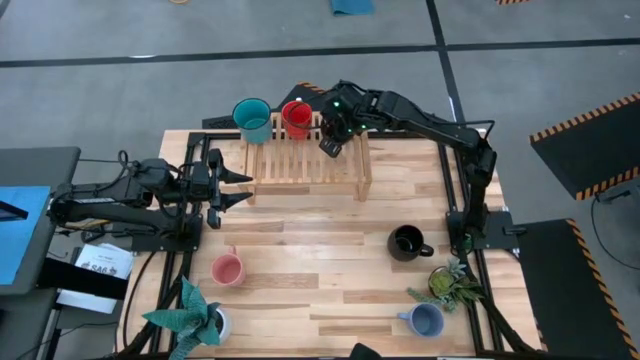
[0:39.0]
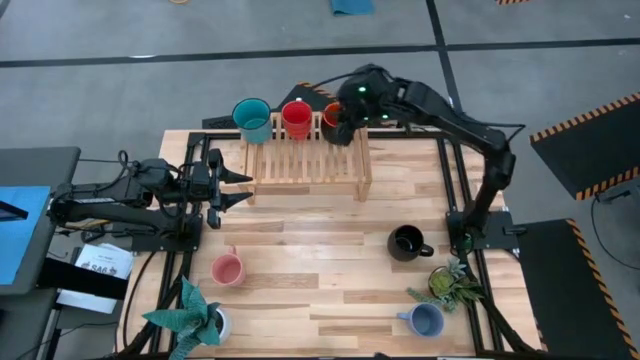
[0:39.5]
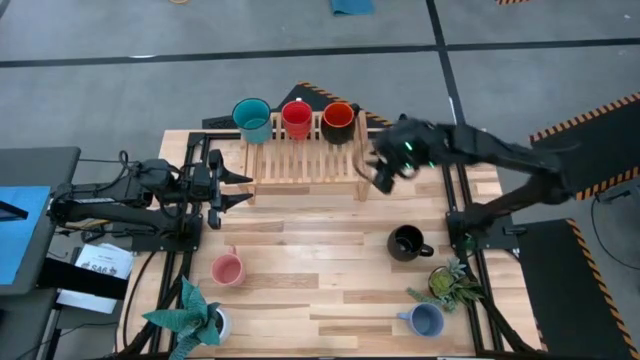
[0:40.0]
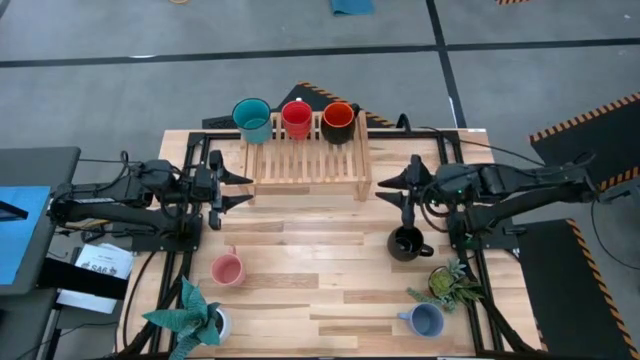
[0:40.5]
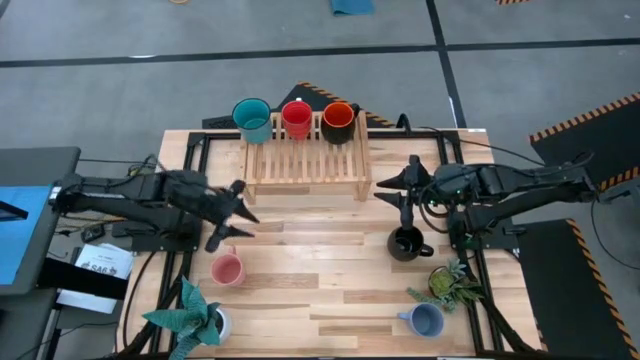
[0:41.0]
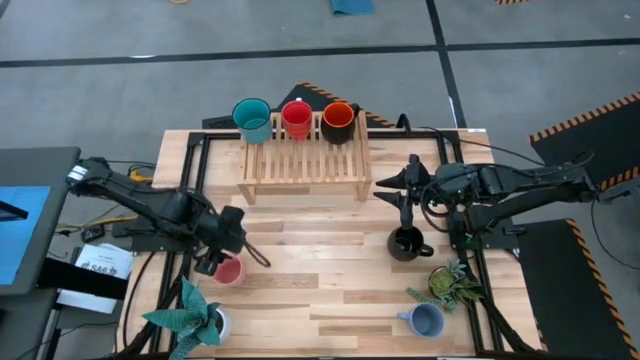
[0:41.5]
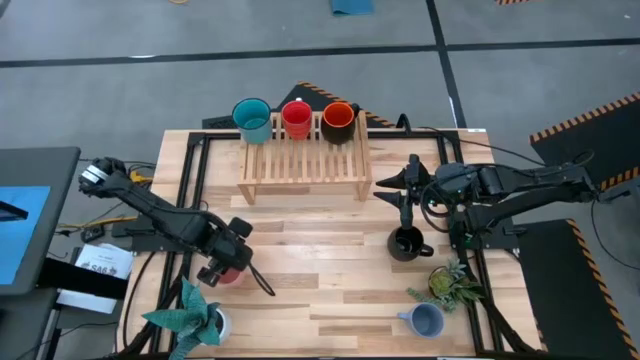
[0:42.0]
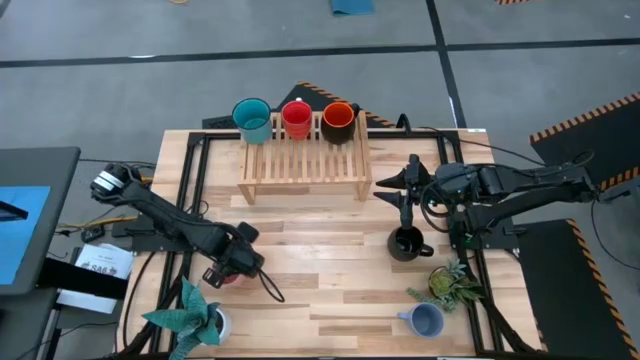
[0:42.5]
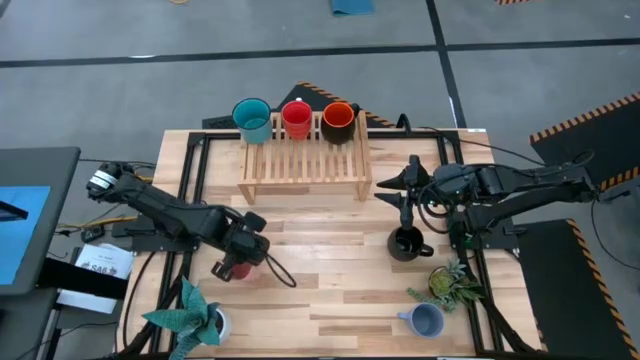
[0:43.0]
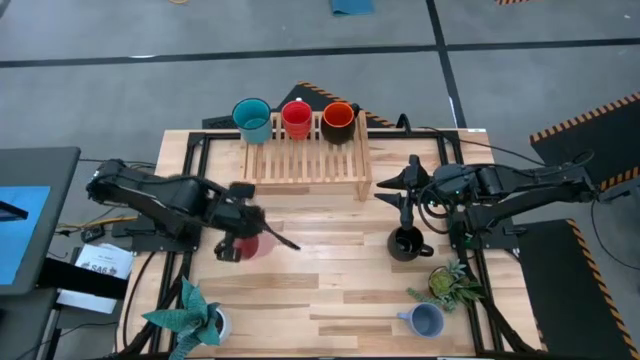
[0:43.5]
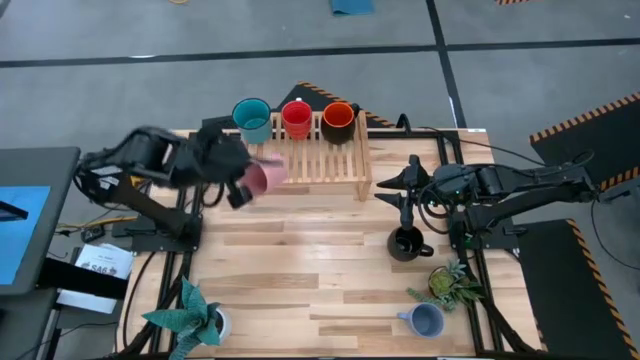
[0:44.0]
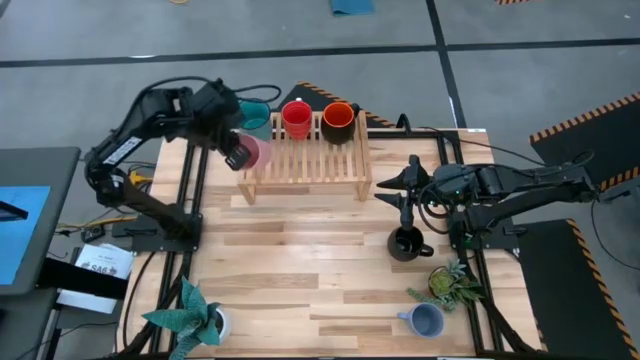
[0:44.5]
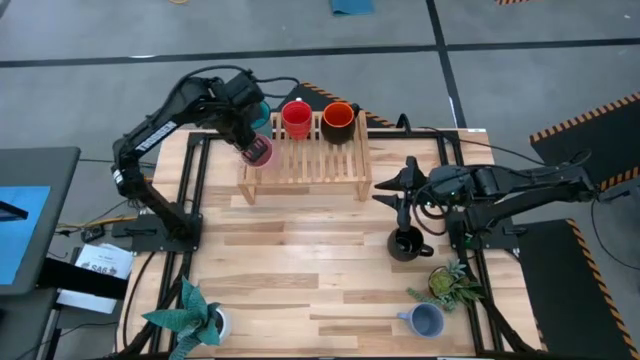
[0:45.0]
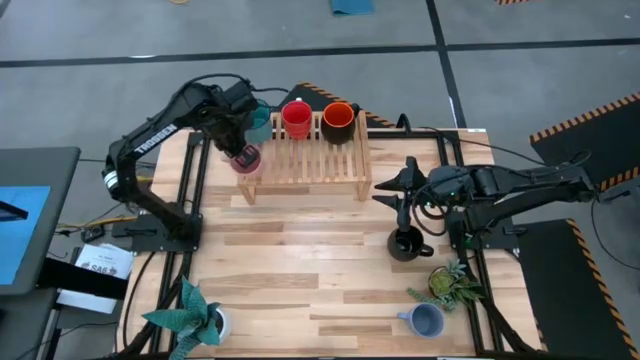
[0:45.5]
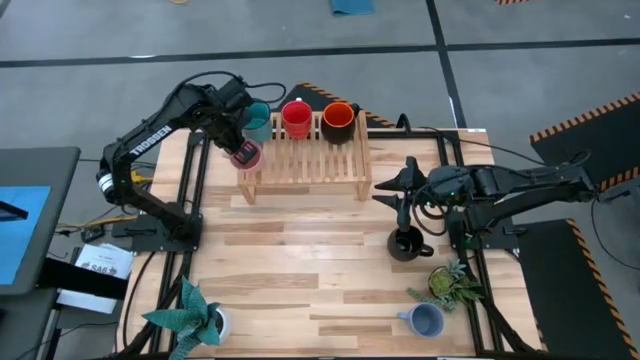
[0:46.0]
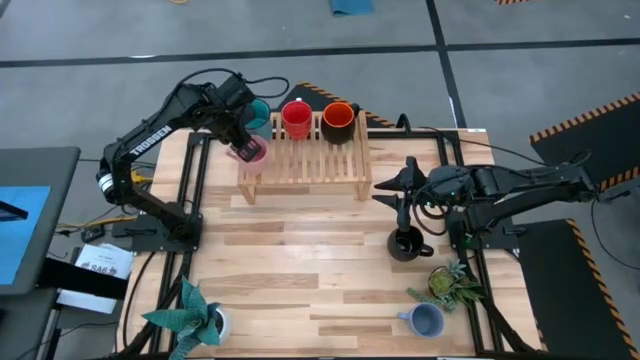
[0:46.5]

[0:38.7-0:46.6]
Task: Place coffee mugs
Put the pink cup on the shelf aligned with the other blue cup

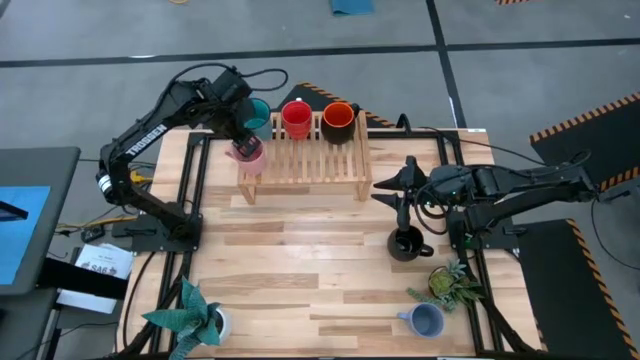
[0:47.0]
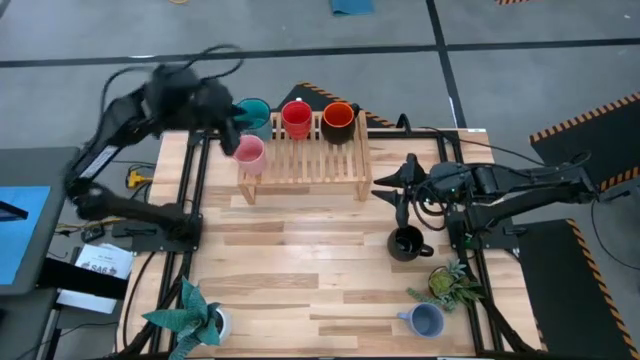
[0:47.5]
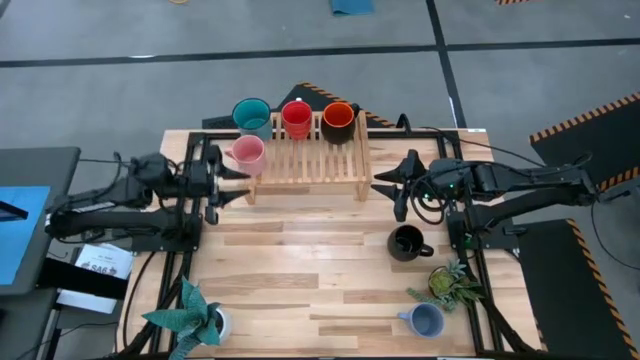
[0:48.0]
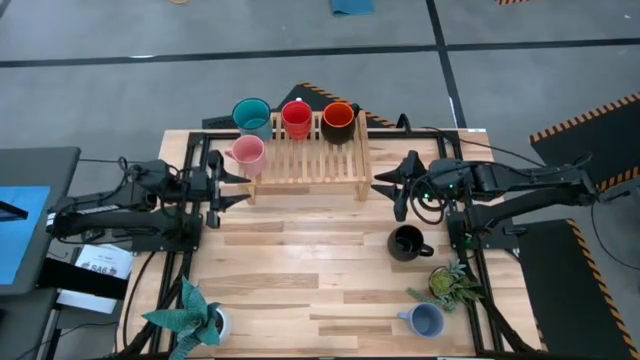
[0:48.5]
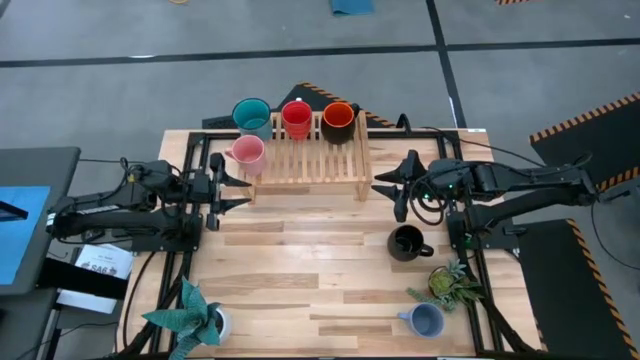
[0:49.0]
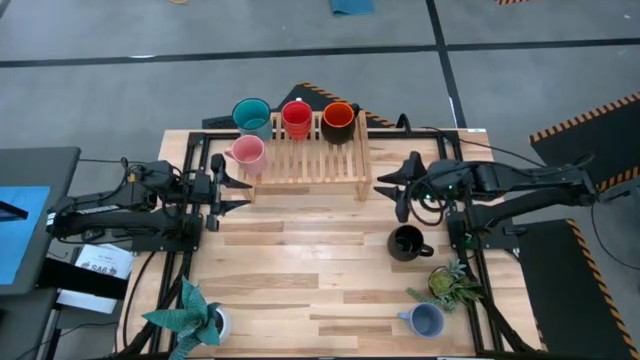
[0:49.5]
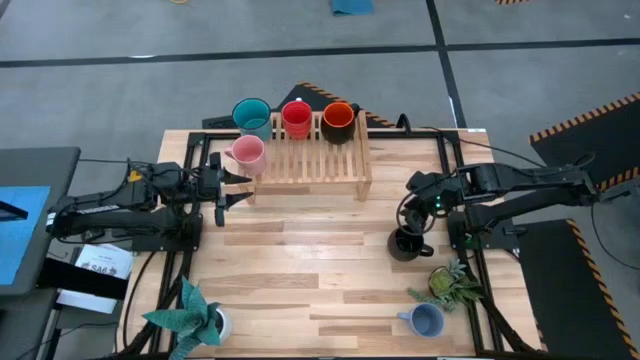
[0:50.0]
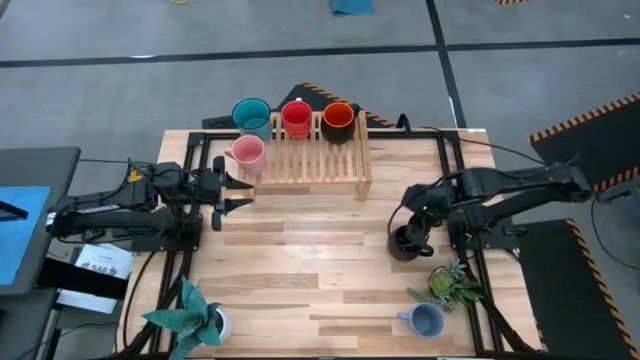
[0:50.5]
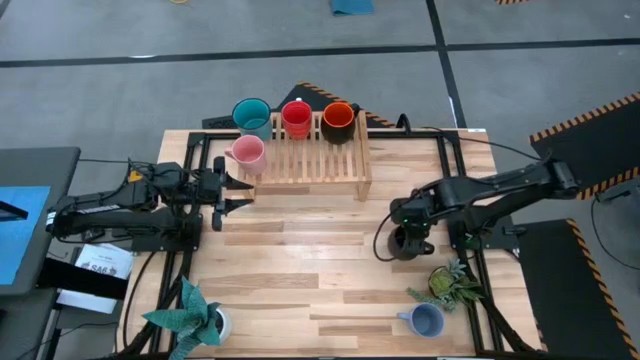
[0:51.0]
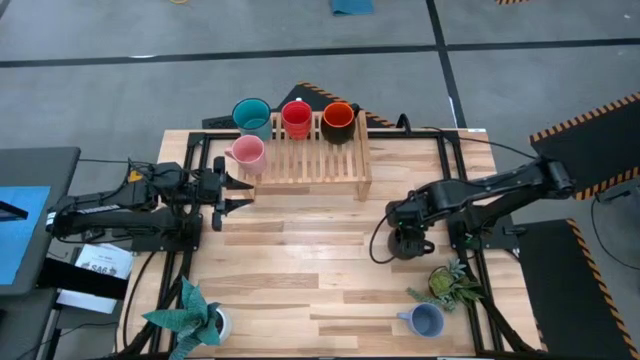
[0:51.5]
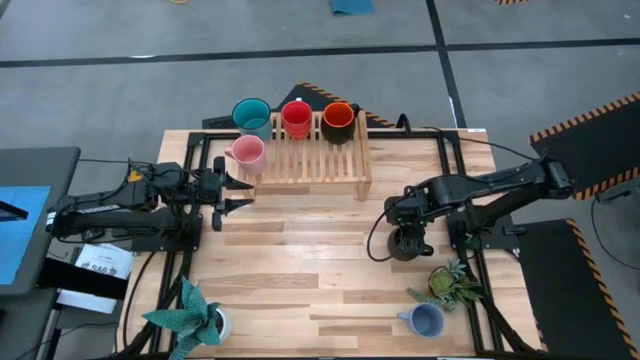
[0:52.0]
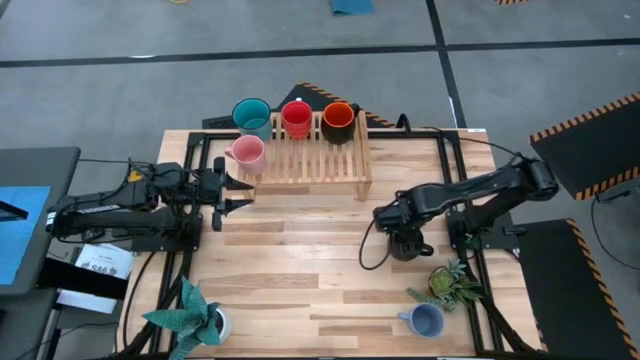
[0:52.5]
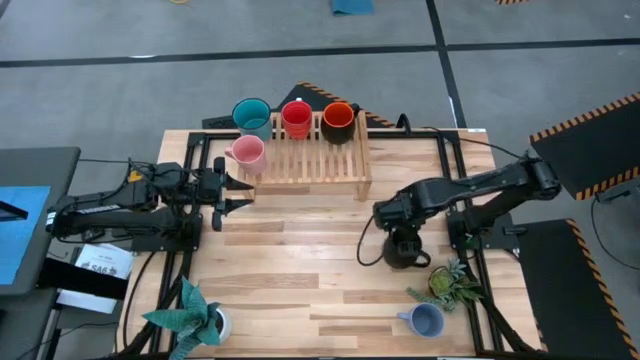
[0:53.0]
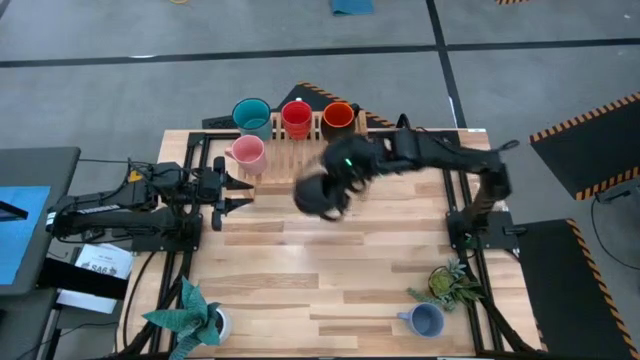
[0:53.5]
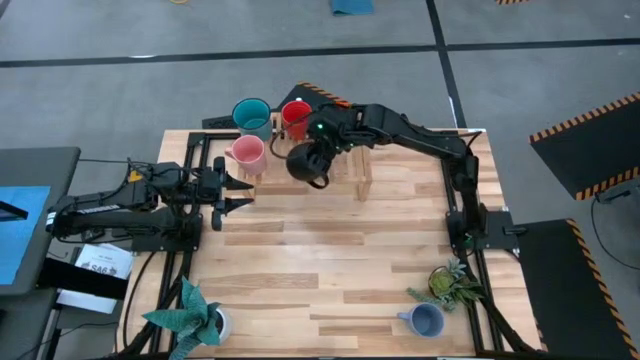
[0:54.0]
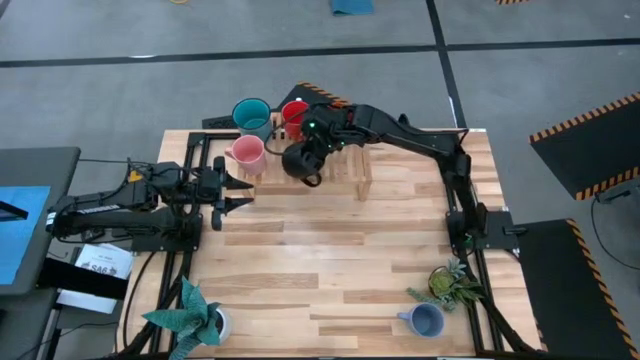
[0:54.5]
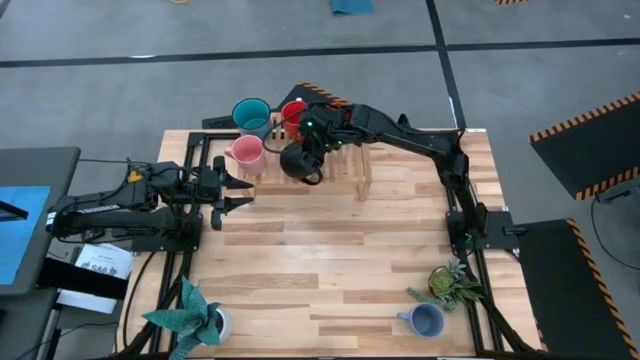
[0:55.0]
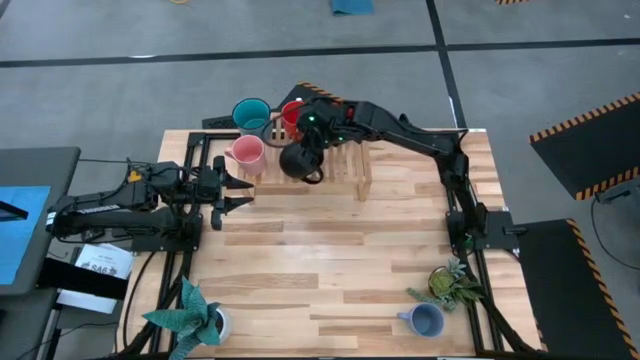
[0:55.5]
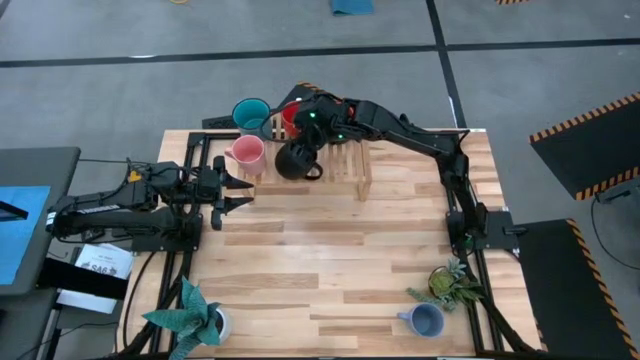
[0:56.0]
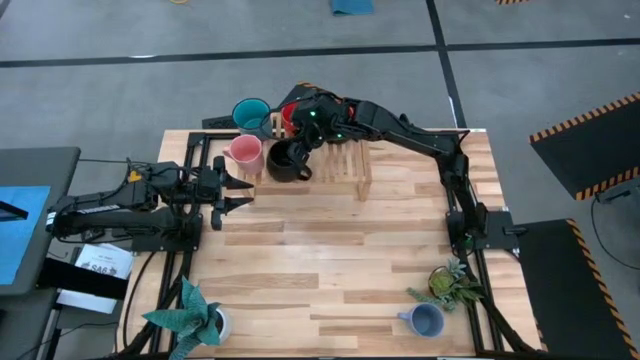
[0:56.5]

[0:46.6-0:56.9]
Put the black cup on the shelf aligned with the other red cup

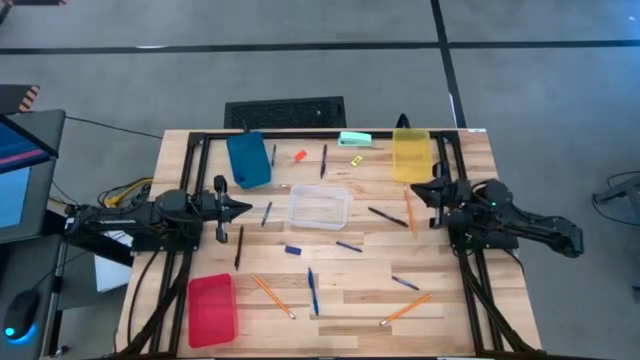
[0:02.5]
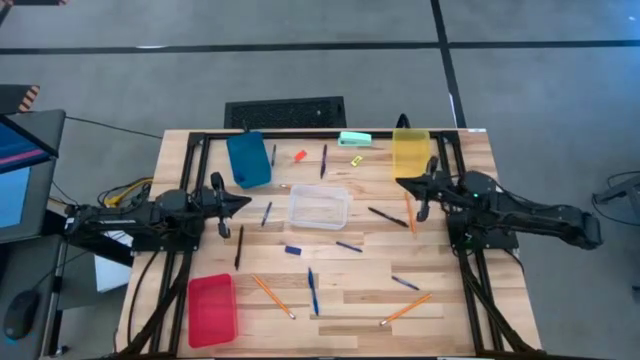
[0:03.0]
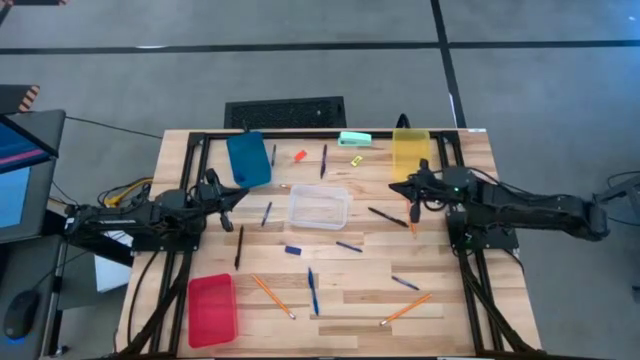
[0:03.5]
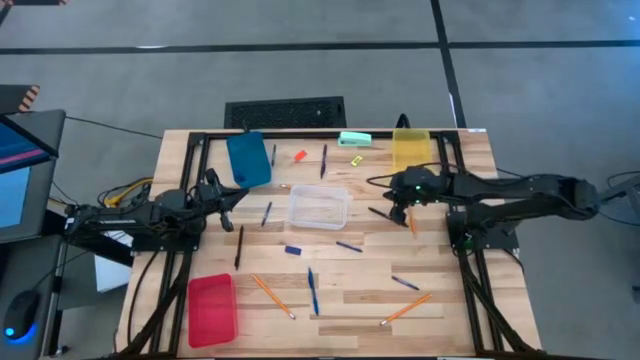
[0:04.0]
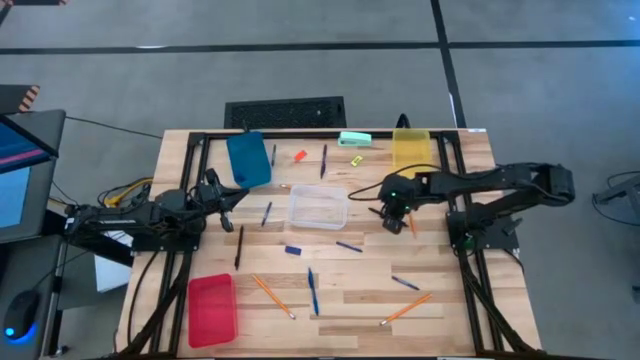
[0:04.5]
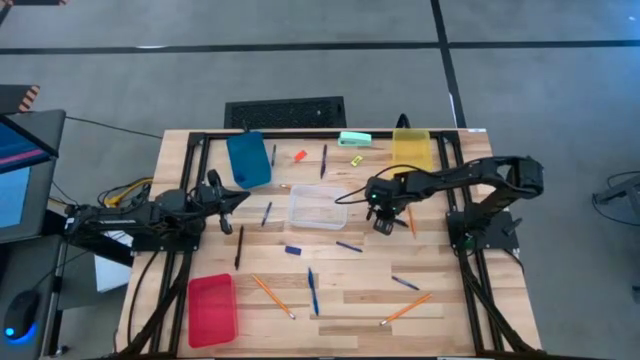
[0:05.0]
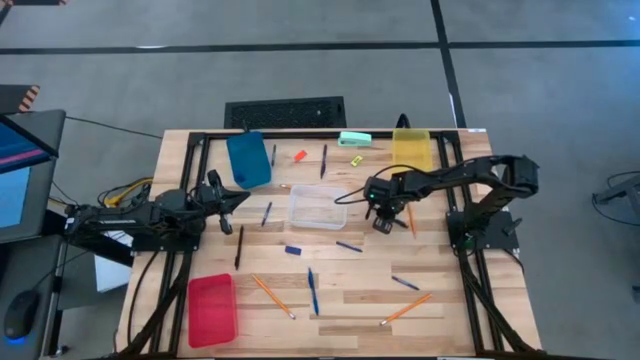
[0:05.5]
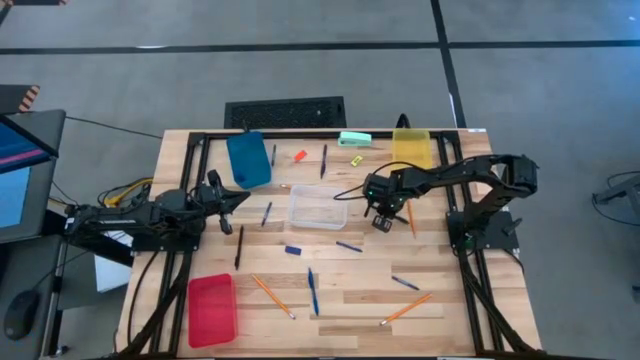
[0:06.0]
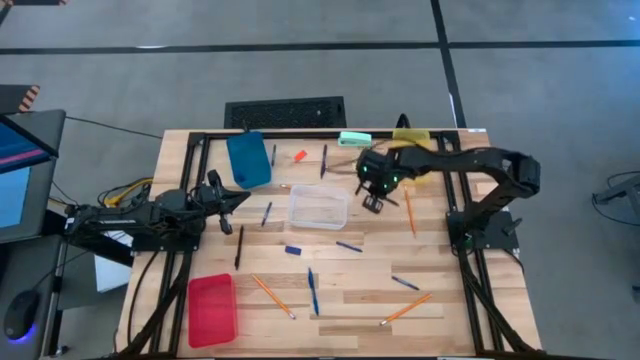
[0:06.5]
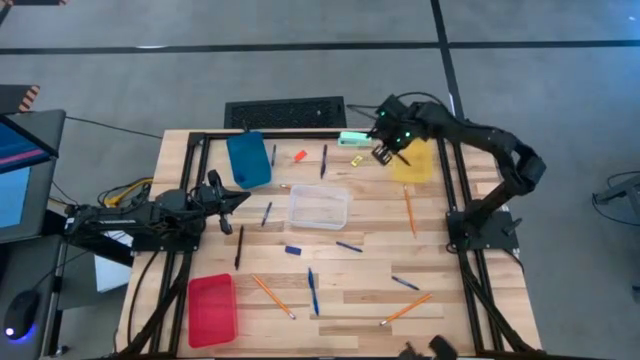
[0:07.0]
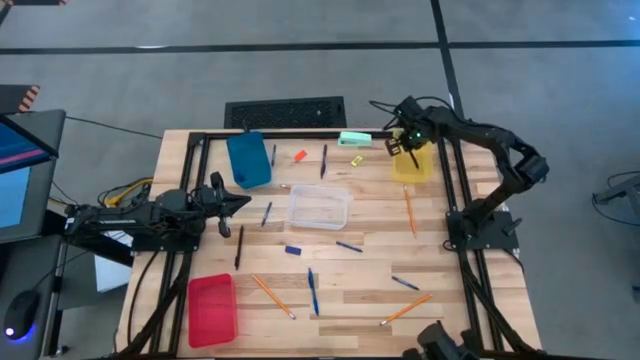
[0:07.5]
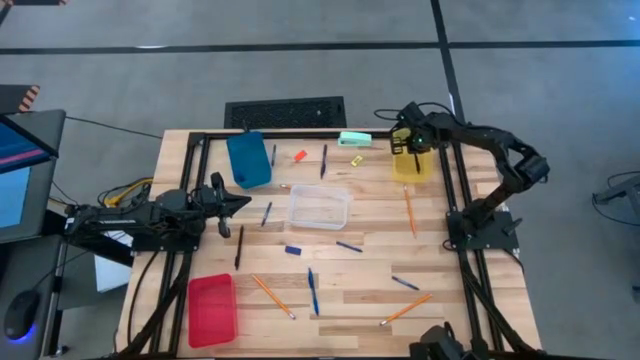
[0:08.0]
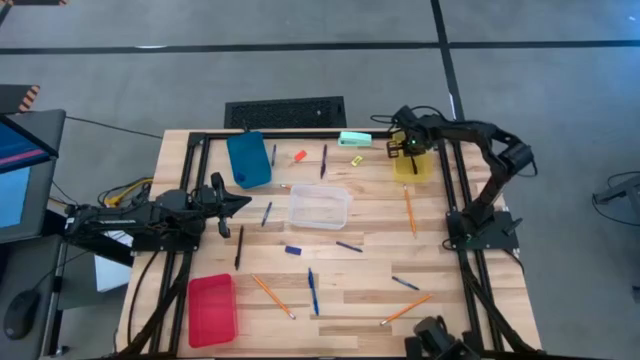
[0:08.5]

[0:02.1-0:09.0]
Task: Sort crayons/erasers/pens/pencils in bins
Put the right black pen into the yellow bin
